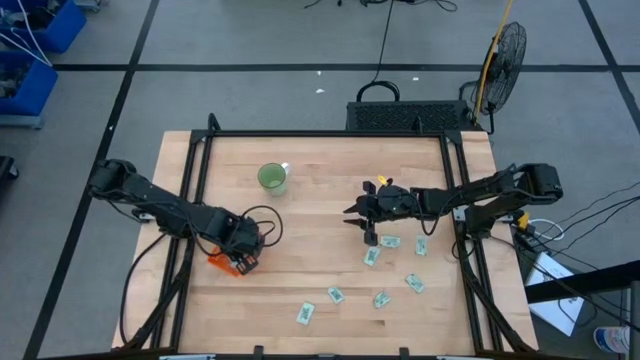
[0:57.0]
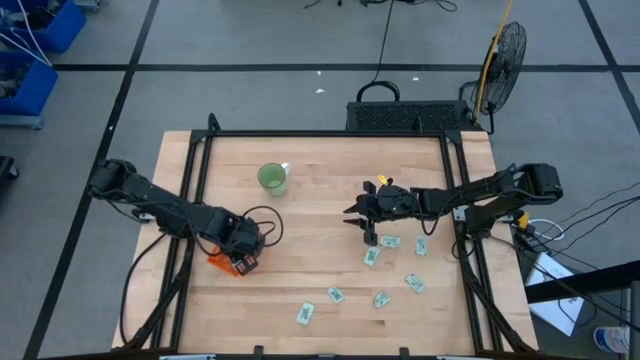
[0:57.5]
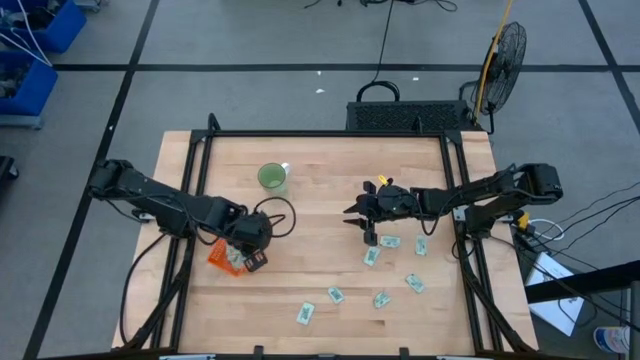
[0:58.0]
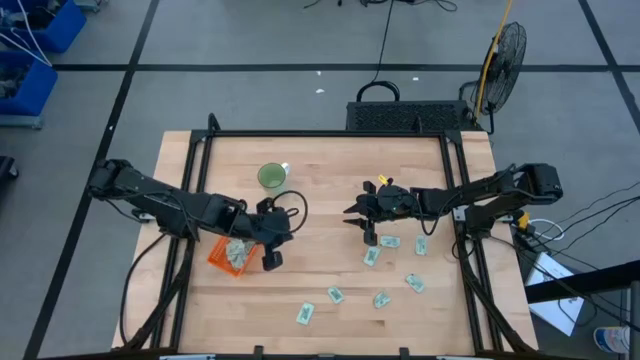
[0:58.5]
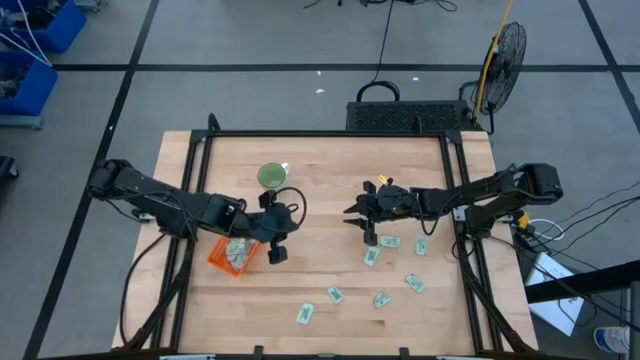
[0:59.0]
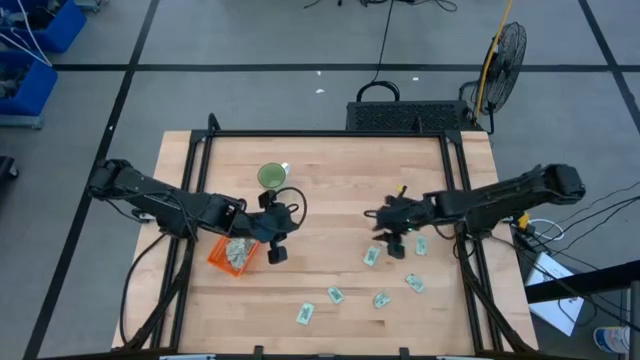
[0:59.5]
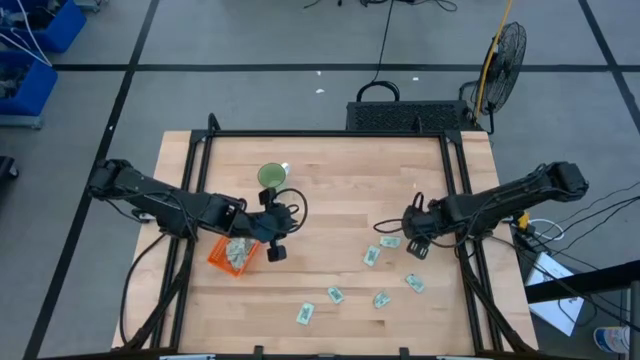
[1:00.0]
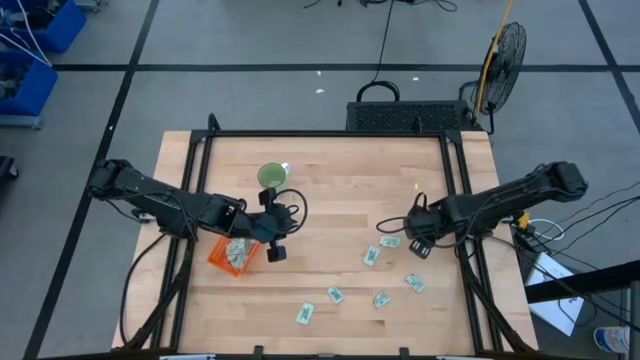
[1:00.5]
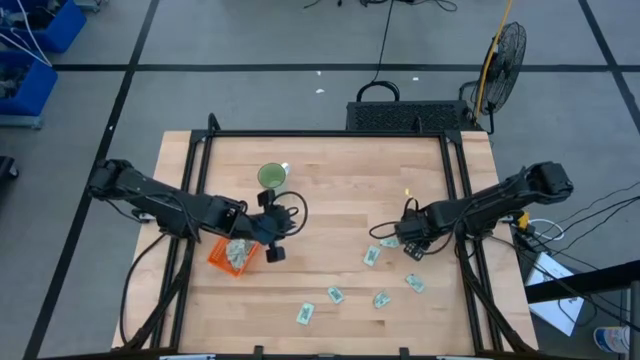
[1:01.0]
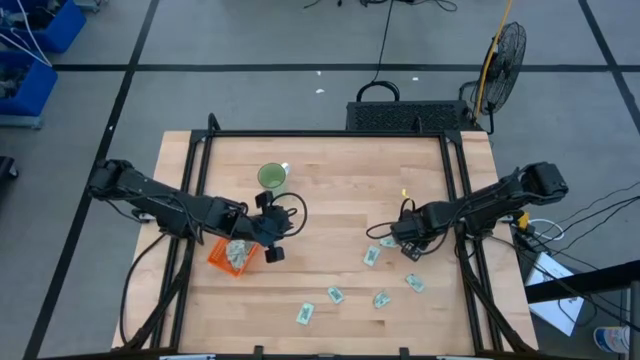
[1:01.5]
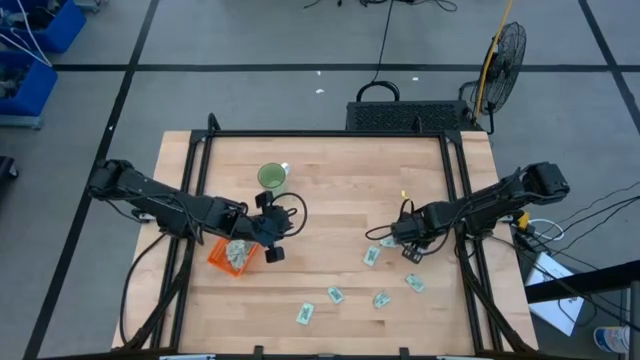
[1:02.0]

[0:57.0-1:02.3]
Task: Pick and place Stevia / Truvia into bins
Put the stevia packet into the orange bin

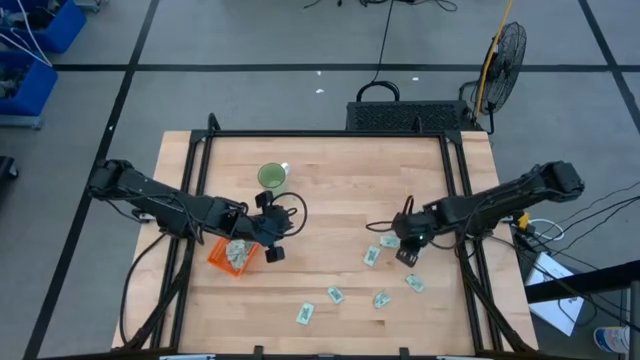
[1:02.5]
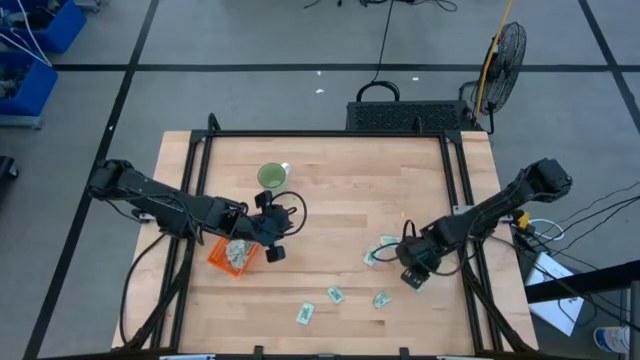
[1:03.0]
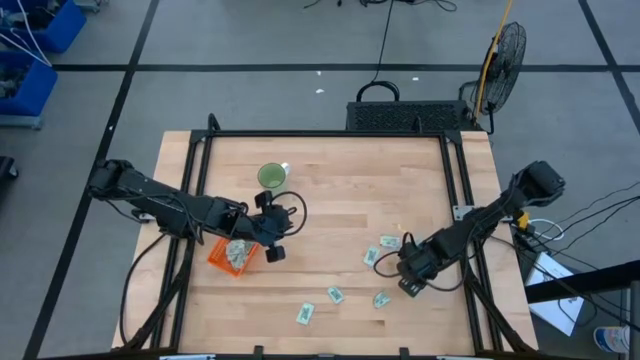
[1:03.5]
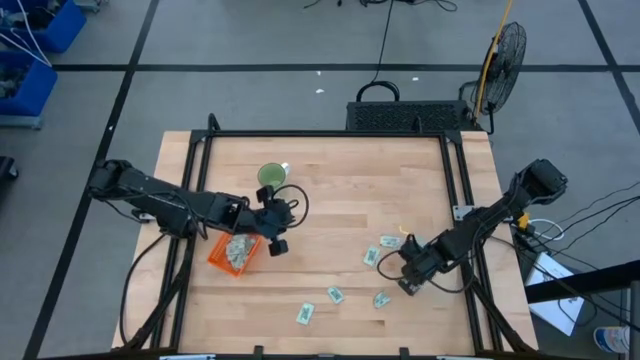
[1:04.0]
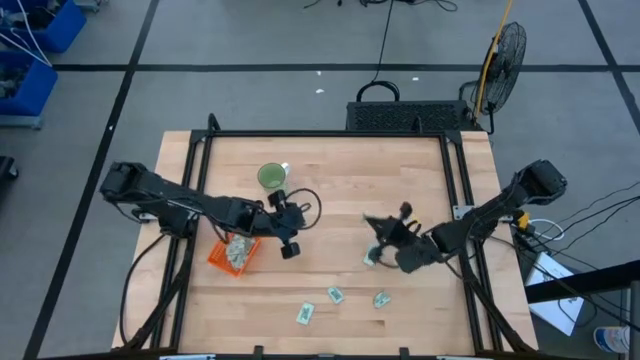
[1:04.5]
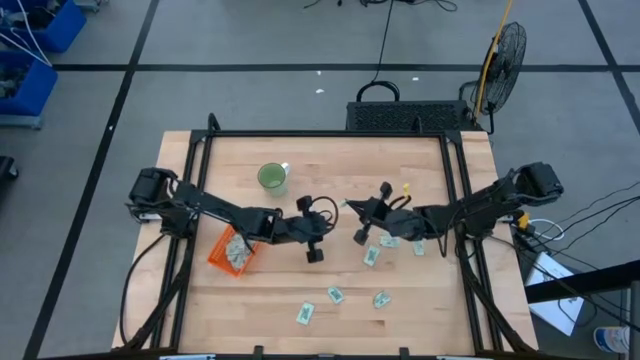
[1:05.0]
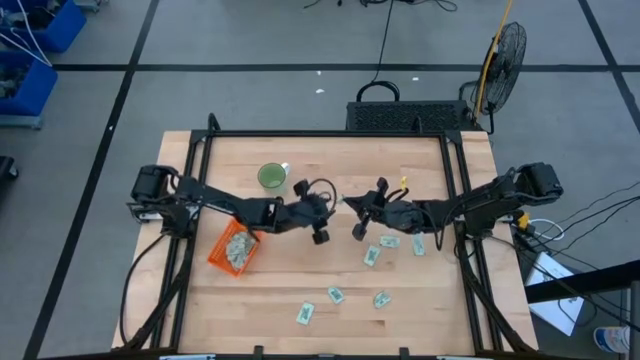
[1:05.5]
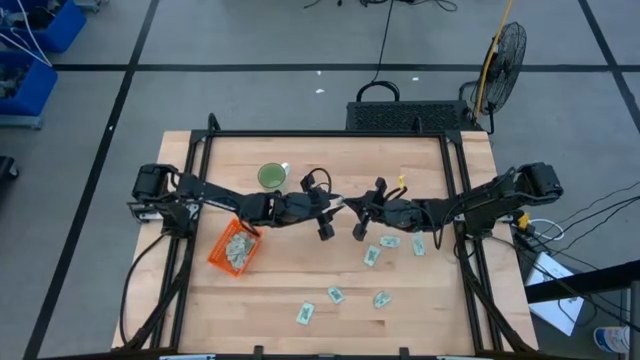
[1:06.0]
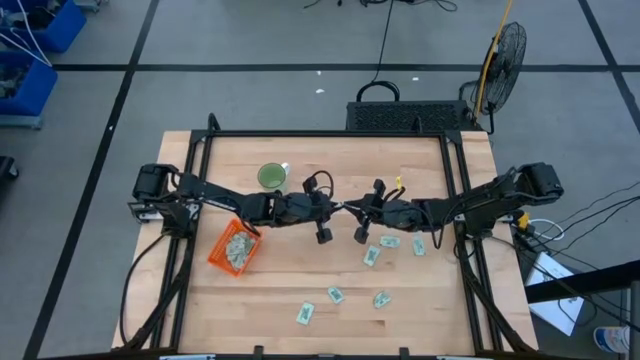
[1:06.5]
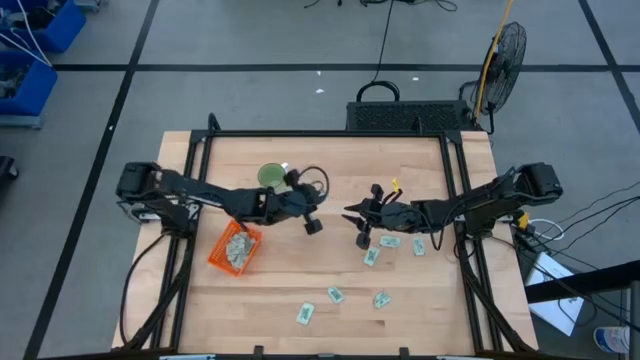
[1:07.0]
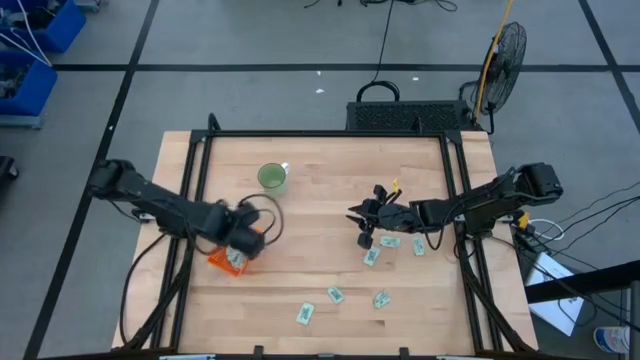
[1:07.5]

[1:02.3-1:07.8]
Put the stevia packet into the orange bin

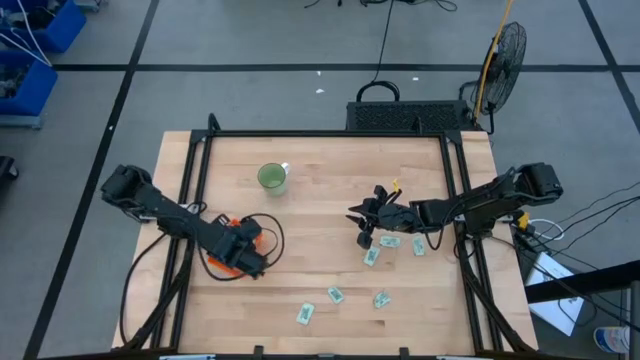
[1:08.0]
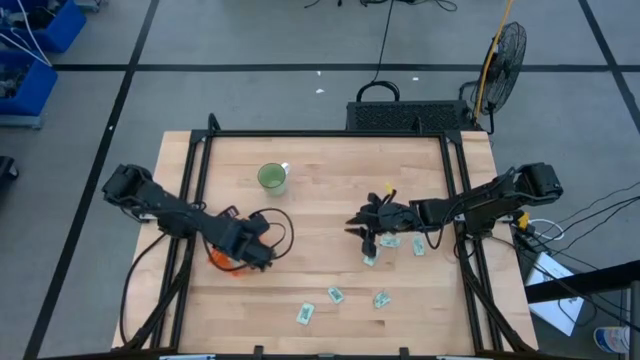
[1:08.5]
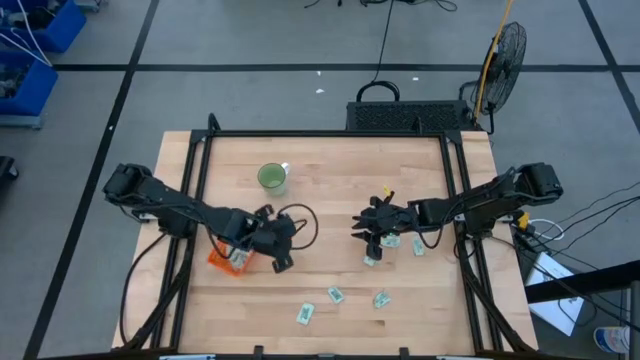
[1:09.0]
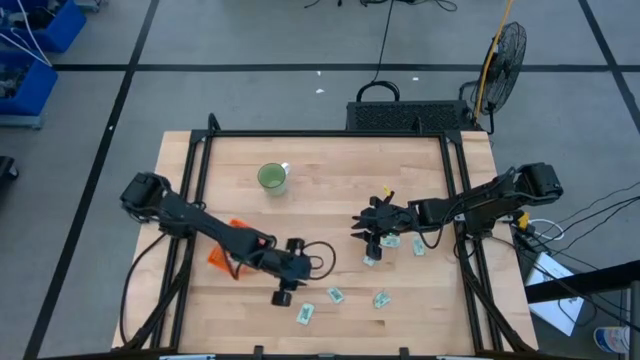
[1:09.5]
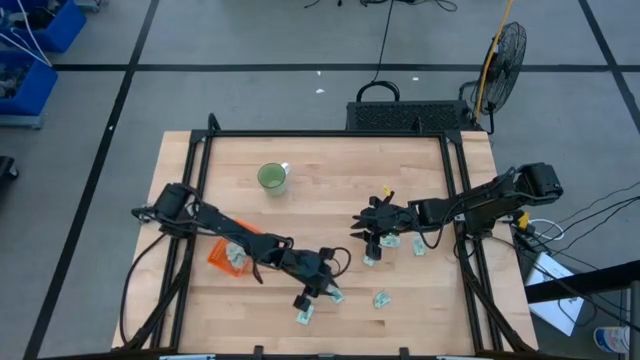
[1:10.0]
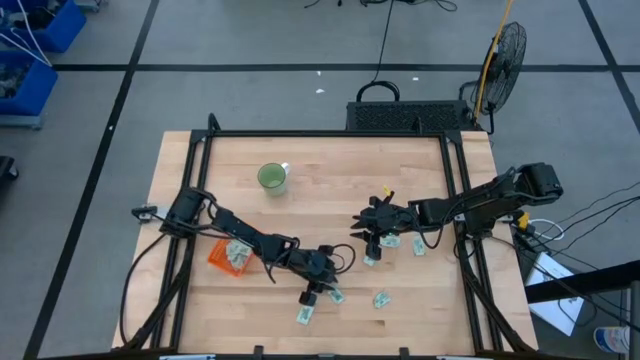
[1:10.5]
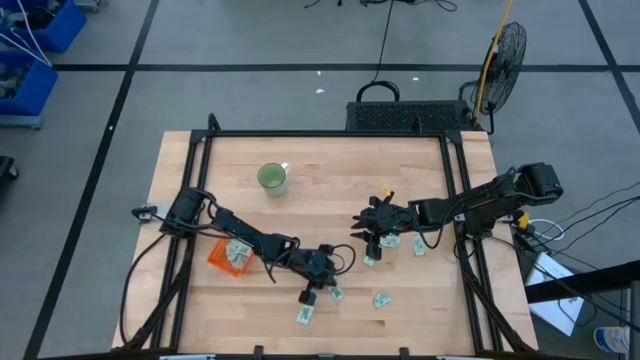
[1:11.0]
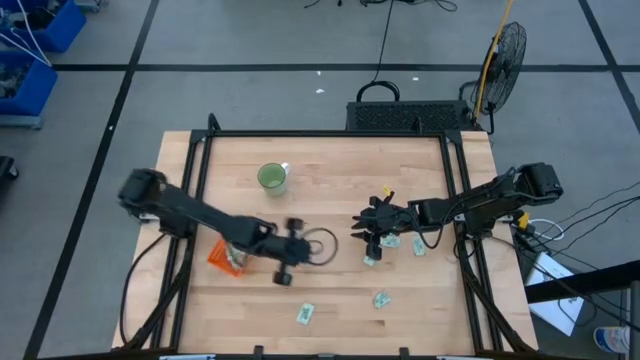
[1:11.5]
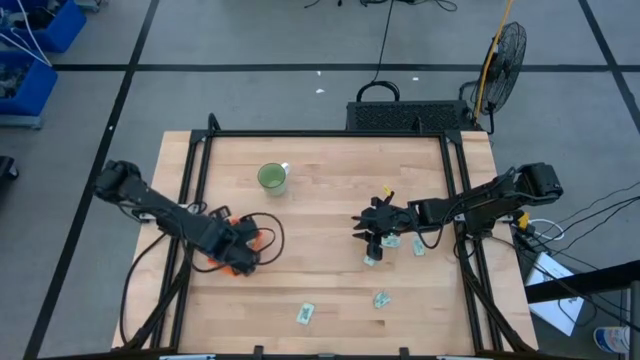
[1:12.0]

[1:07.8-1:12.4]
Put the stevia packet into the orange bin

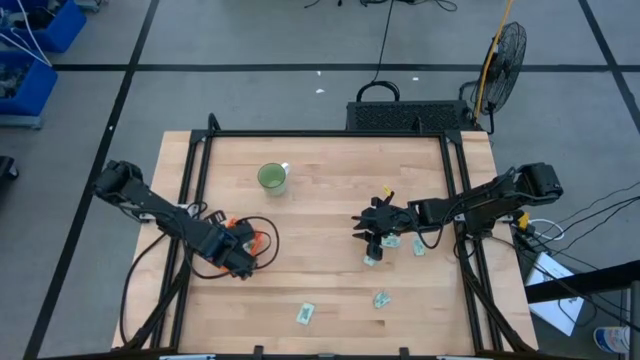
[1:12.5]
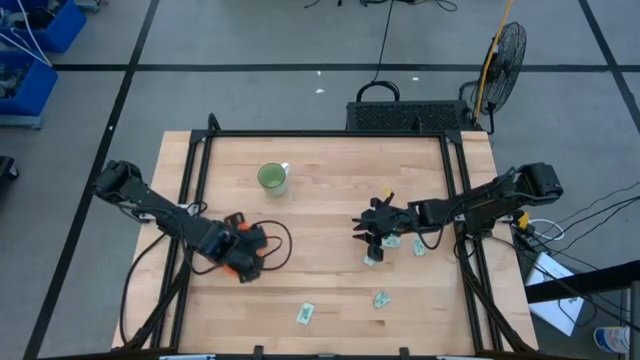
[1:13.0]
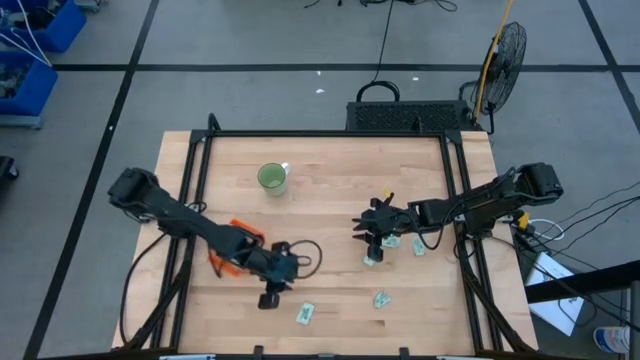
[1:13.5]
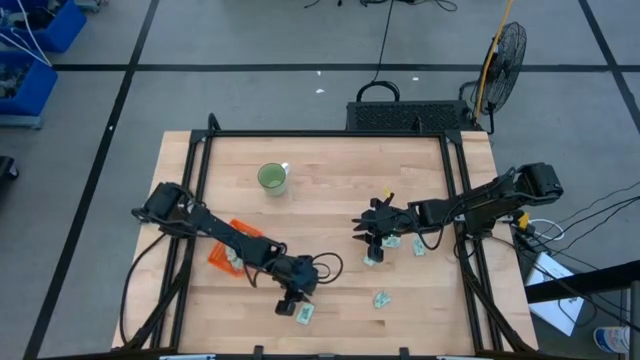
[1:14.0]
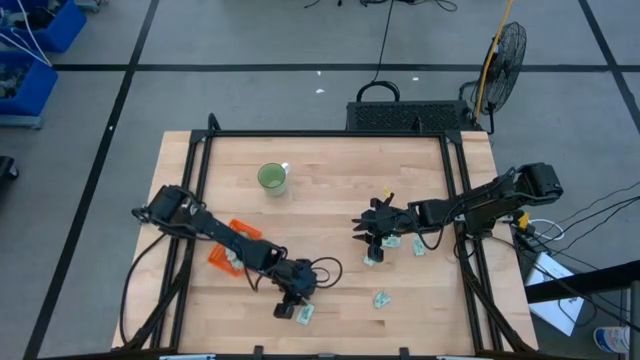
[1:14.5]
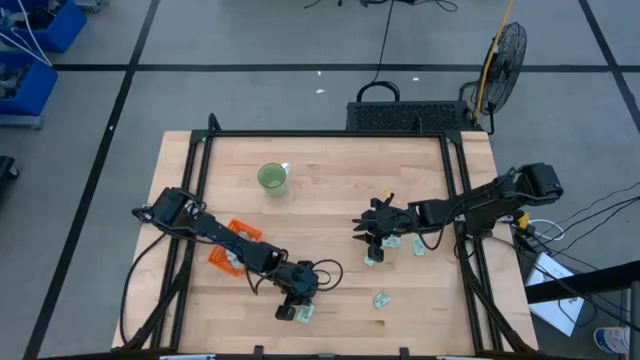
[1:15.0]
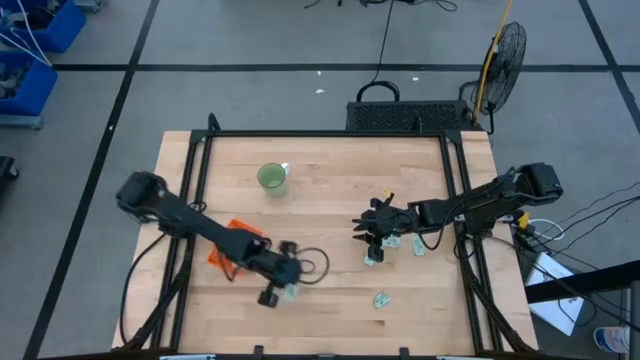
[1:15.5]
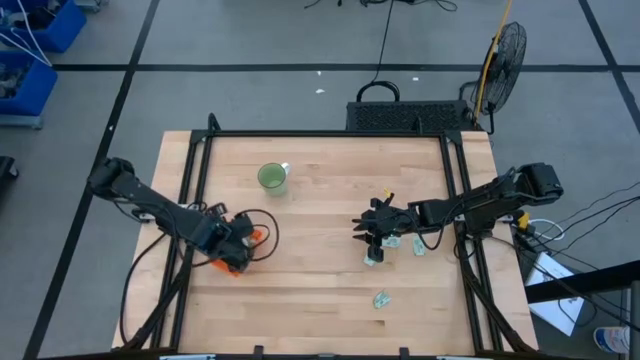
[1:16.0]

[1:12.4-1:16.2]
Put the stevia packet into the orange bin

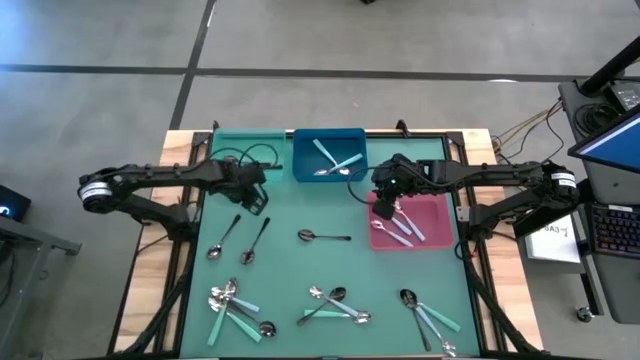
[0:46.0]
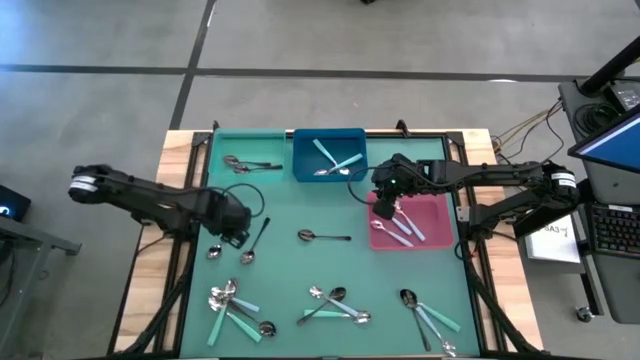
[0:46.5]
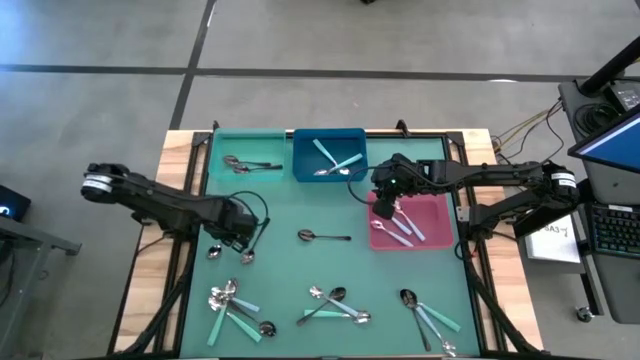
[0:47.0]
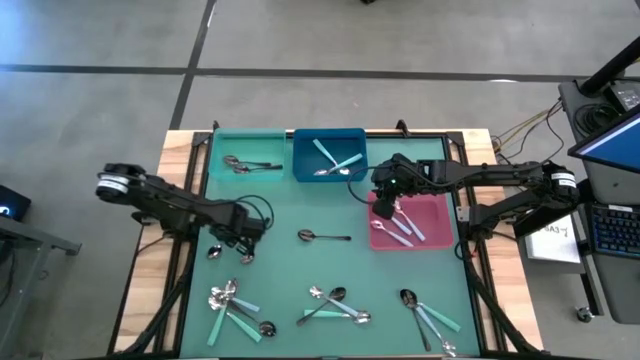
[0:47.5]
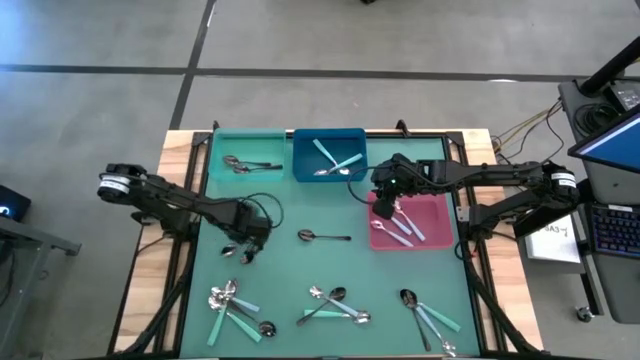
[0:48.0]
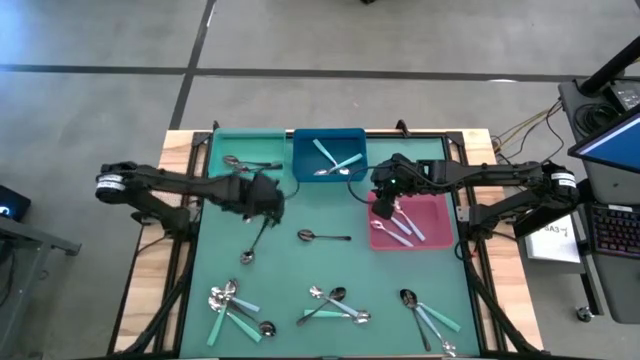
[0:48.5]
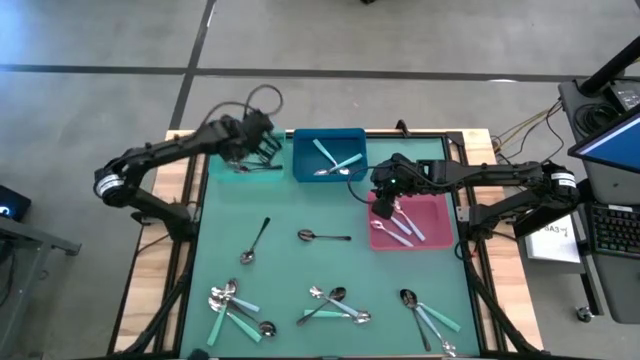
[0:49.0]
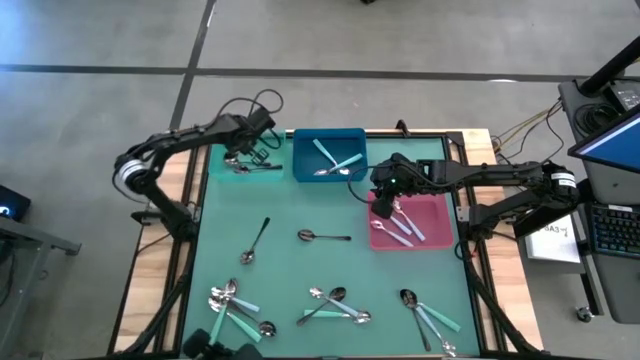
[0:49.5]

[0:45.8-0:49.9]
Task: Sort silverware by color (type)
Put the black spoon into the green bin
